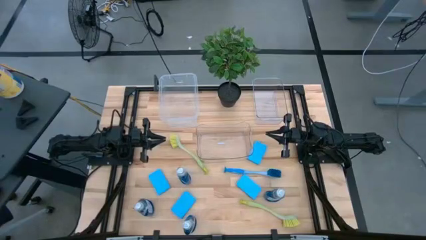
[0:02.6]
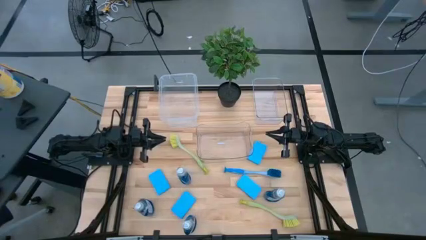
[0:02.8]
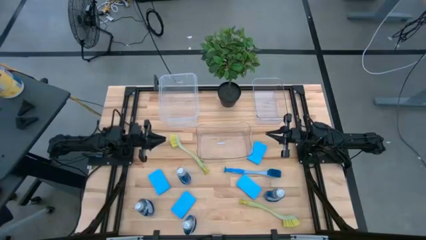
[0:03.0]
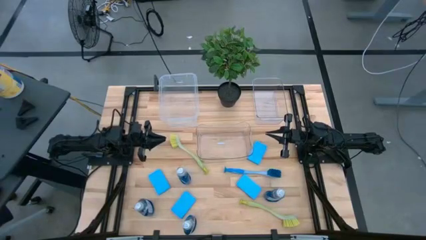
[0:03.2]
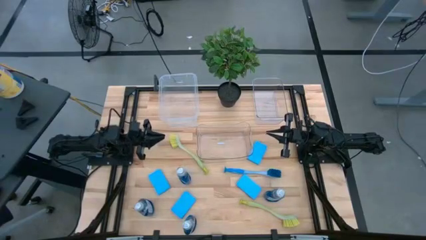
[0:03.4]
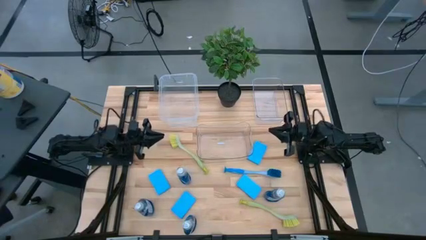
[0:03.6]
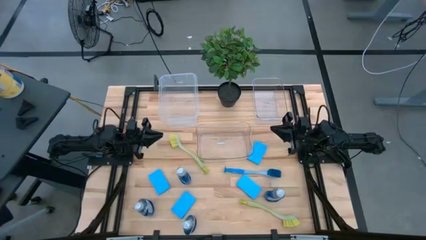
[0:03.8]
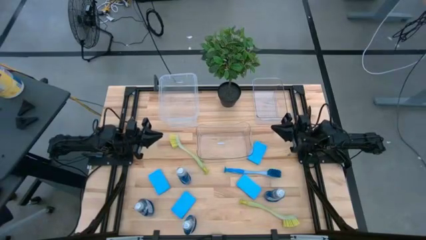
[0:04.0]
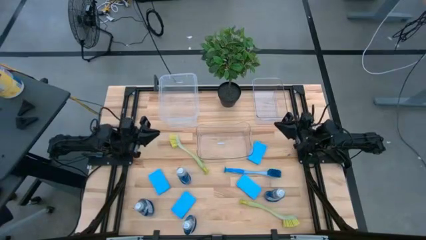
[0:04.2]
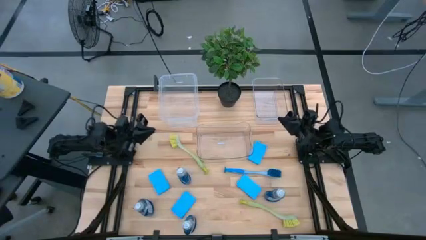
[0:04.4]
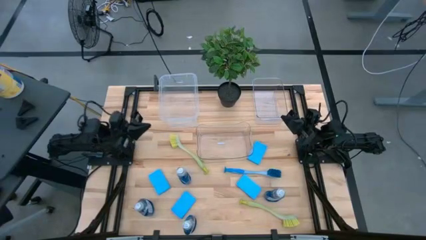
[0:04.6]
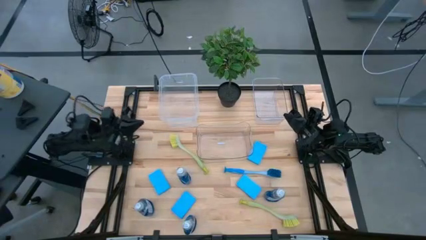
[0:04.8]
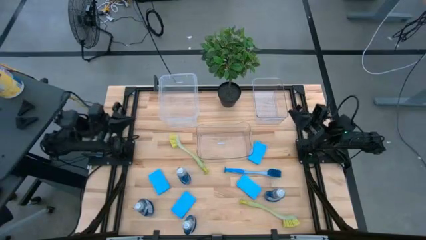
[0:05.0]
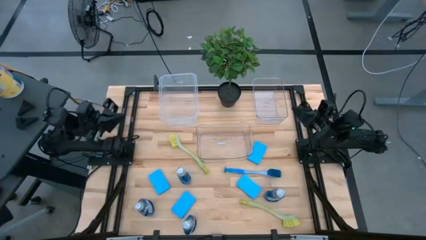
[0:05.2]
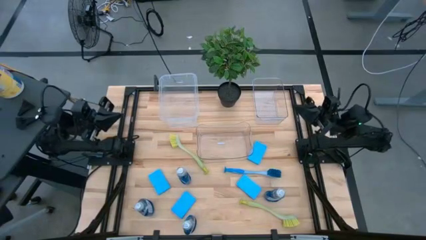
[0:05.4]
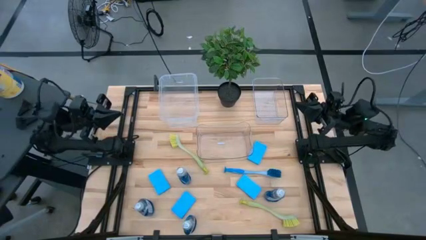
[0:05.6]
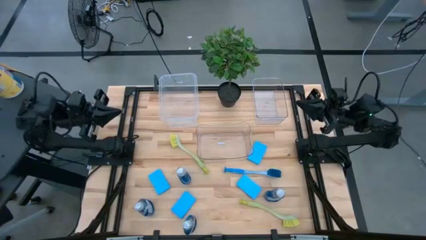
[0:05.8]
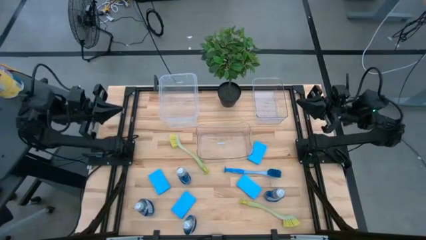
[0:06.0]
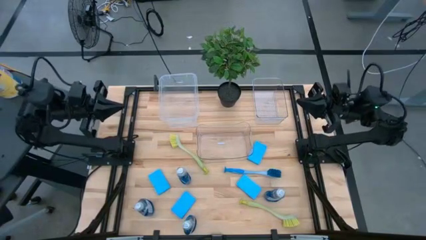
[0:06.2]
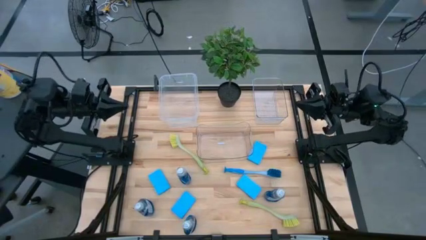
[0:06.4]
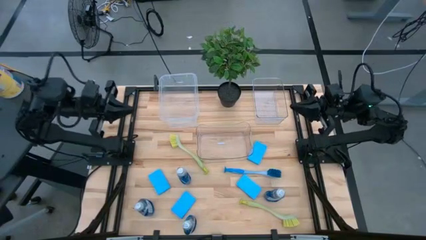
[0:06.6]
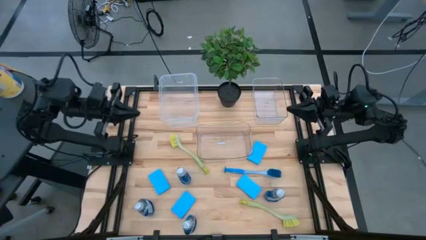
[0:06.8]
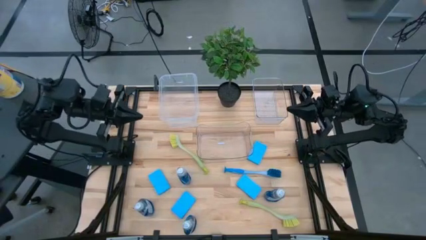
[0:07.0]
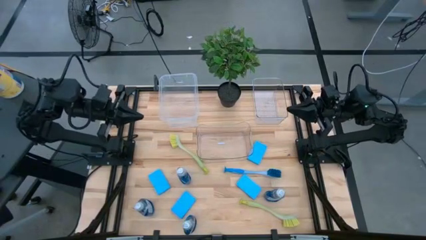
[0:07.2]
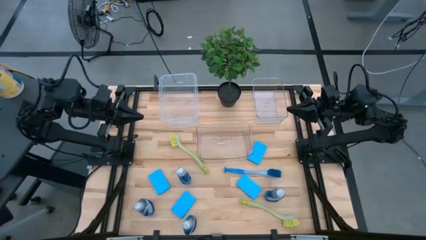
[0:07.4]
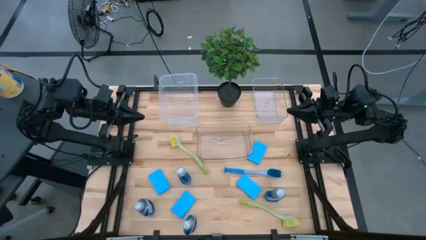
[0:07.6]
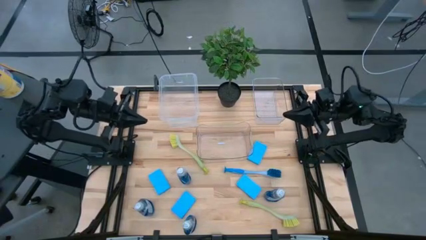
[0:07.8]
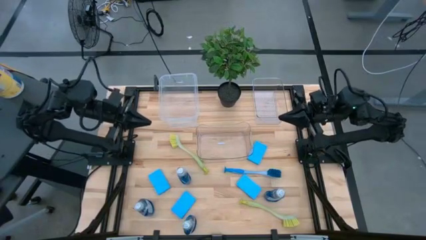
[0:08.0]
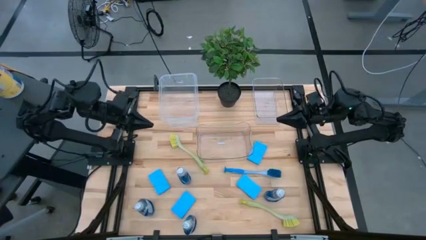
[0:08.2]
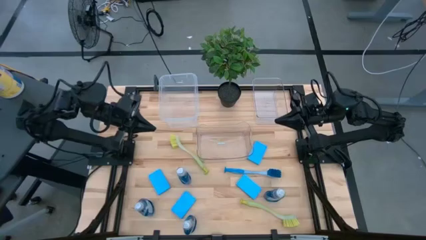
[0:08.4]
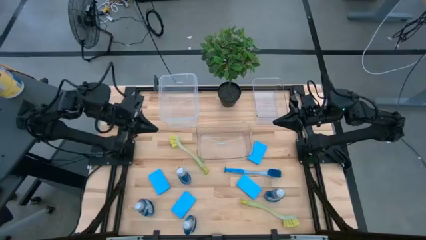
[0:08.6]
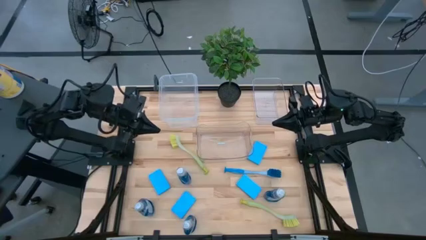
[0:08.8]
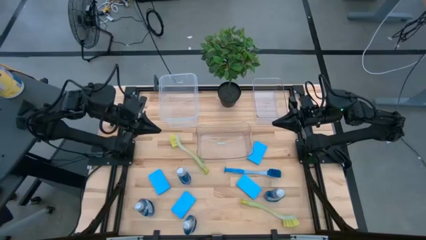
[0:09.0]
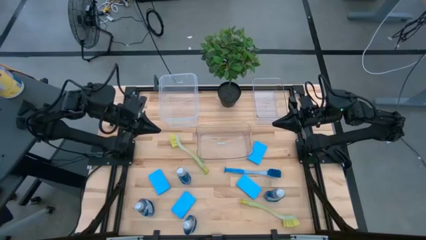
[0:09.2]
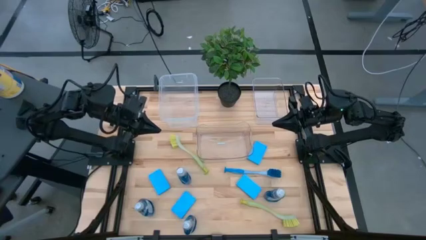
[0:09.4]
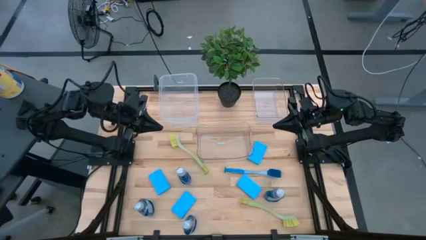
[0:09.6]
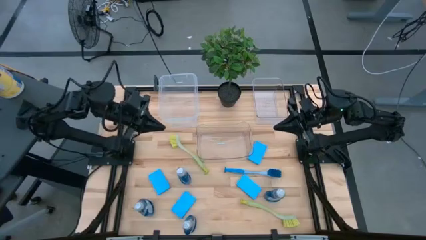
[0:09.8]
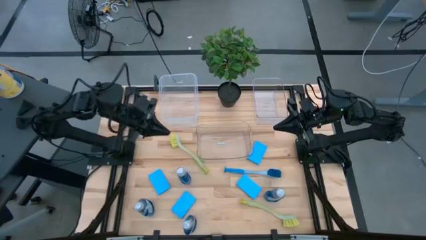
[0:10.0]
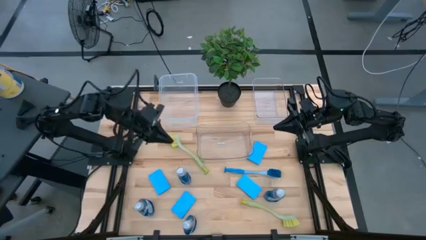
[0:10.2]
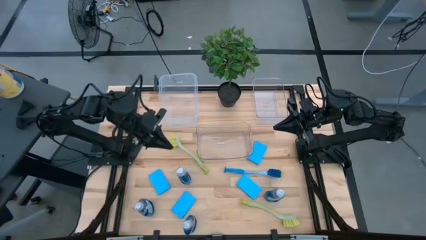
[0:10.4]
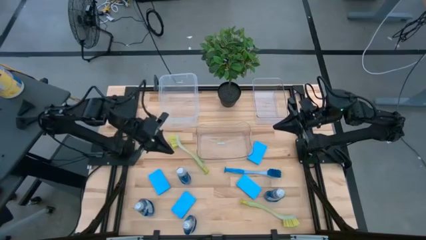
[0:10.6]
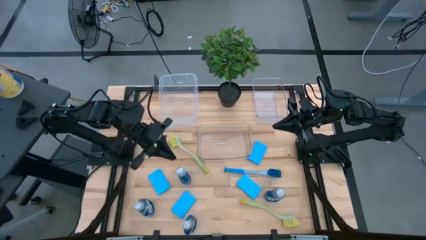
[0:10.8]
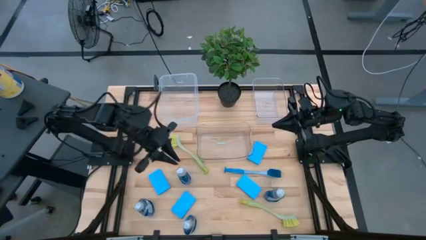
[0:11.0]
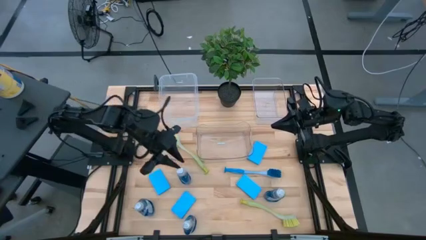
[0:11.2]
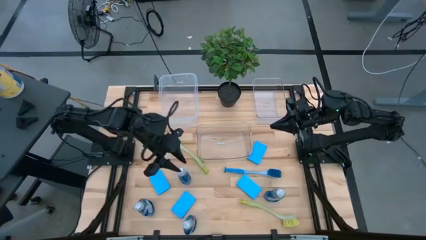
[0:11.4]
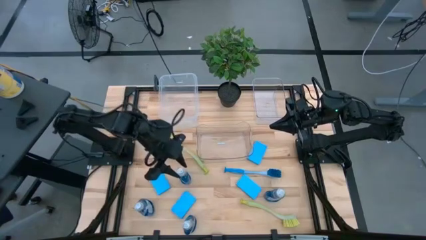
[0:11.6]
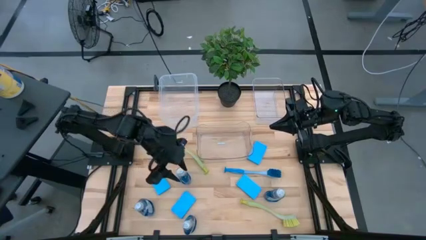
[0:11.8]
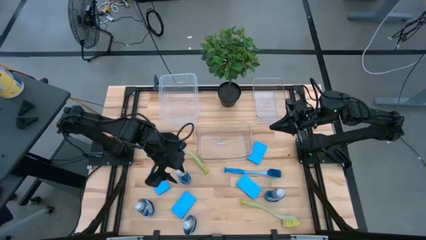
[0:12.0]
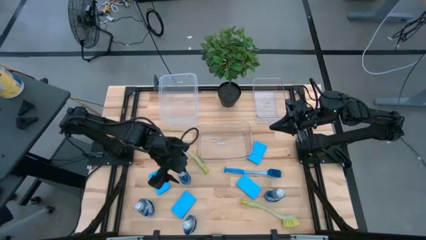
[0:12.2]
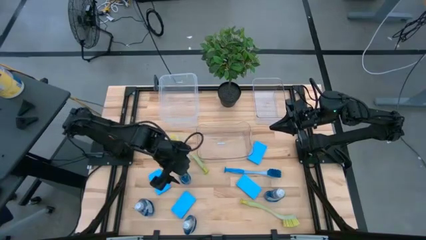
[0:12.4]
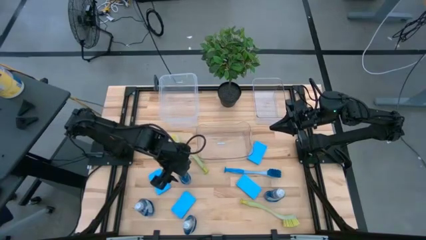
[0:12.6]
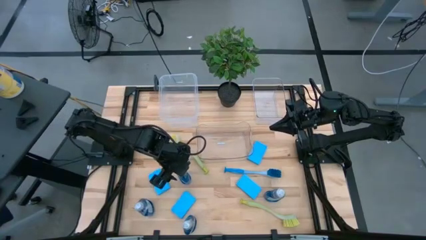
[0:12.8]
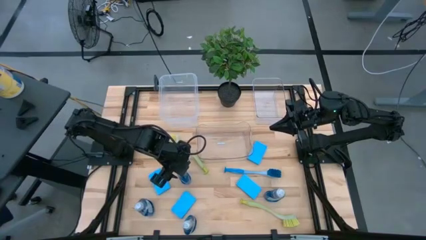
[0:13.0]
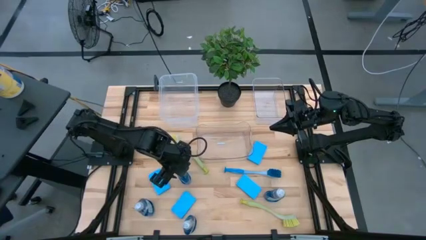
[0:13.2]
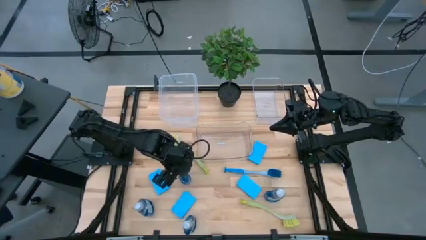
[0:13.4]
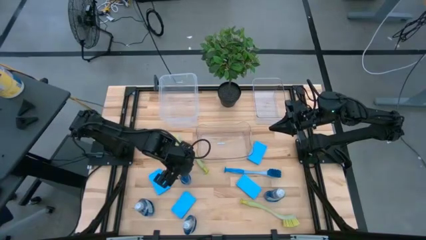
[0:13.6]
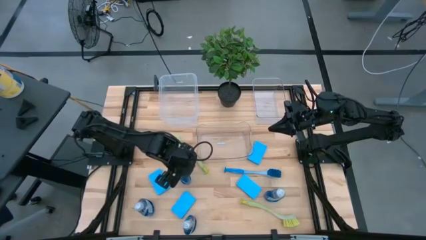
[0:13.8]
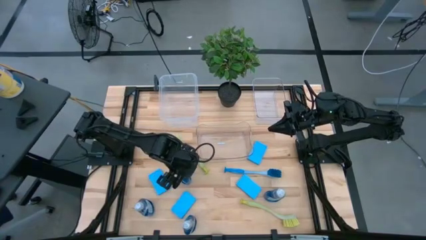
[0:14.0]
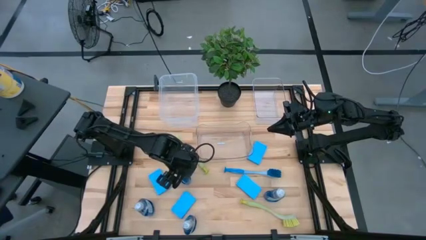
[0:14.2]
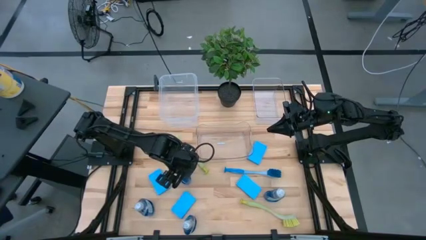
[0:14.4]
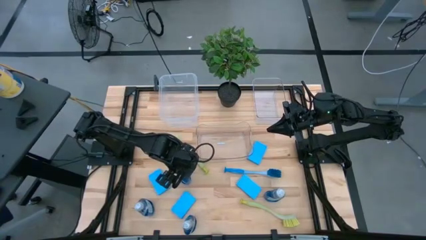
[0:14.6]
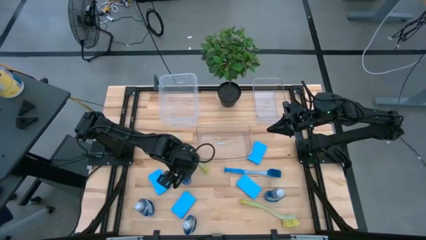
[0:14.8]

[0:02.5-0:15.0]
Task: Pick & Place Kitchen Sink Supplies
Put the dish soap into the top transparent bin

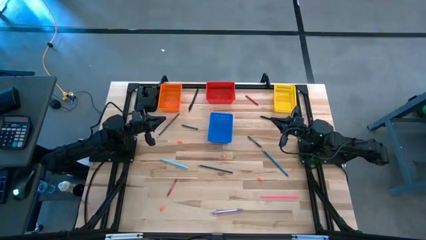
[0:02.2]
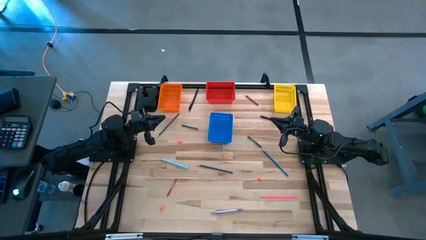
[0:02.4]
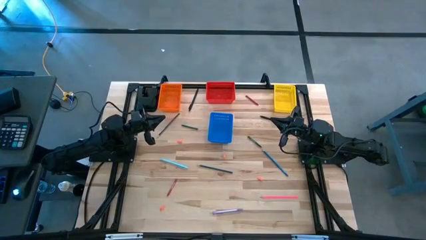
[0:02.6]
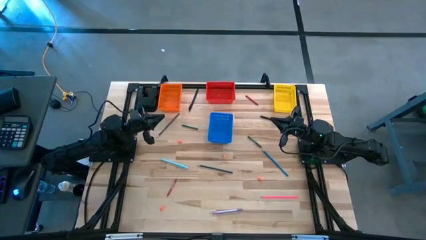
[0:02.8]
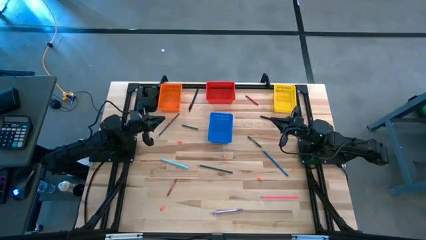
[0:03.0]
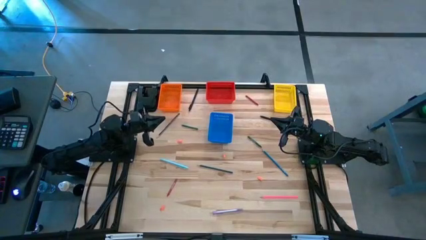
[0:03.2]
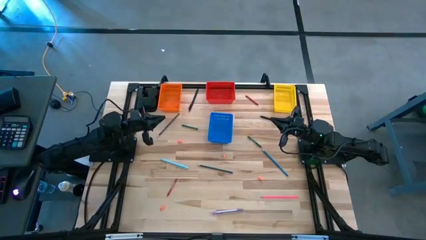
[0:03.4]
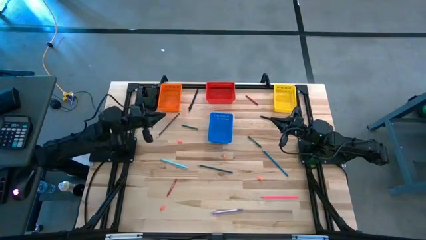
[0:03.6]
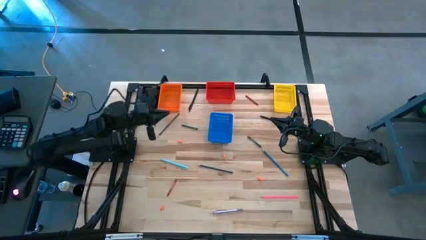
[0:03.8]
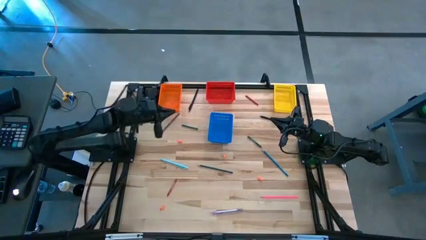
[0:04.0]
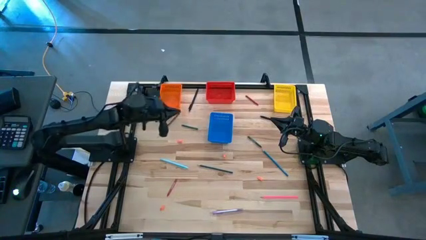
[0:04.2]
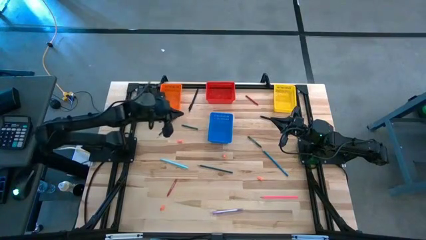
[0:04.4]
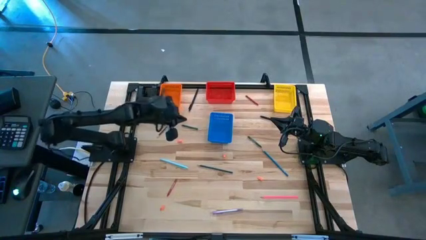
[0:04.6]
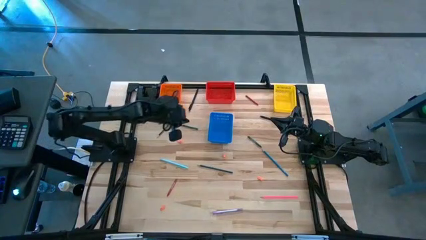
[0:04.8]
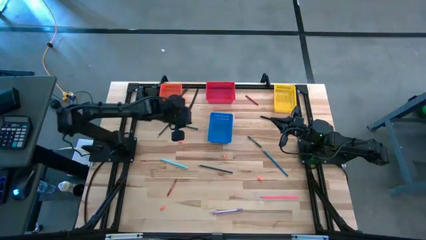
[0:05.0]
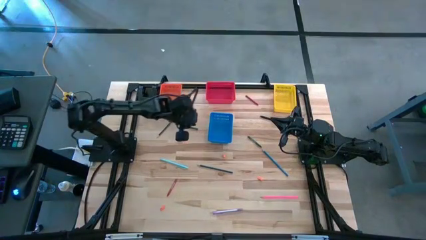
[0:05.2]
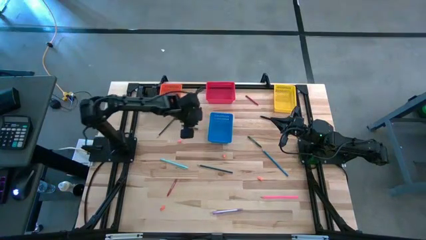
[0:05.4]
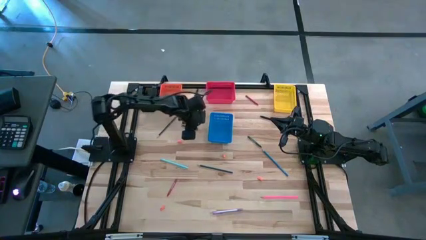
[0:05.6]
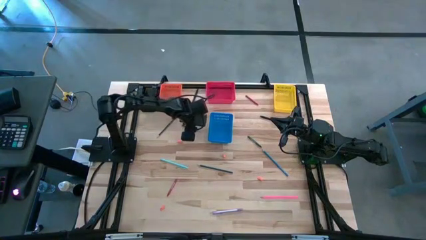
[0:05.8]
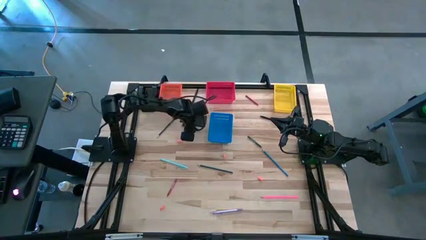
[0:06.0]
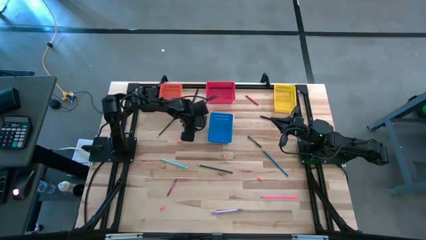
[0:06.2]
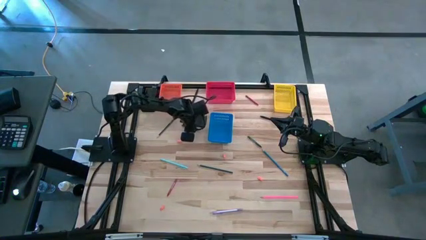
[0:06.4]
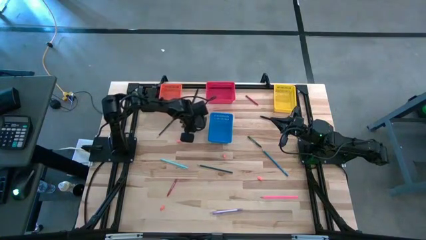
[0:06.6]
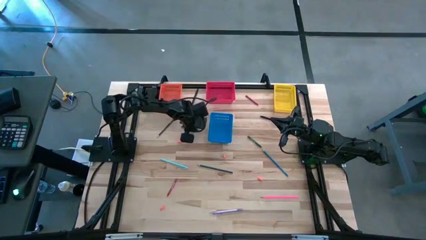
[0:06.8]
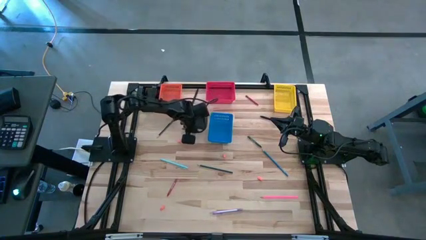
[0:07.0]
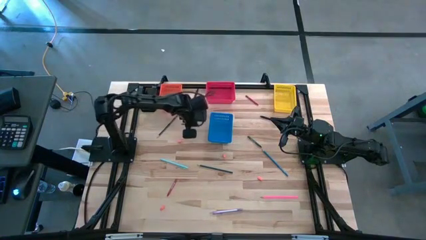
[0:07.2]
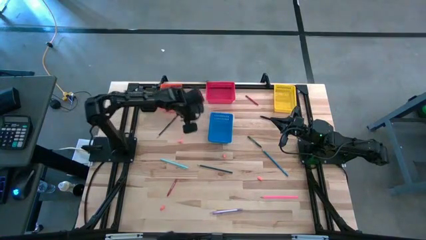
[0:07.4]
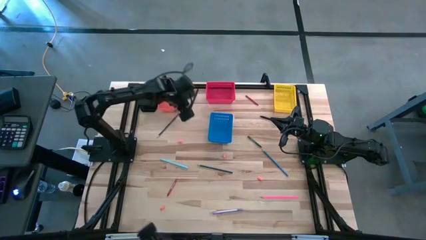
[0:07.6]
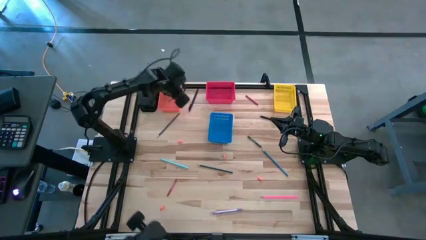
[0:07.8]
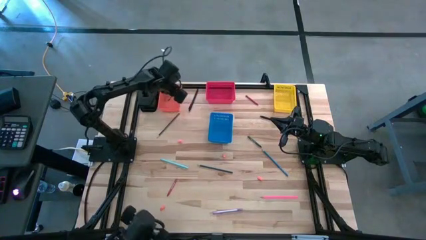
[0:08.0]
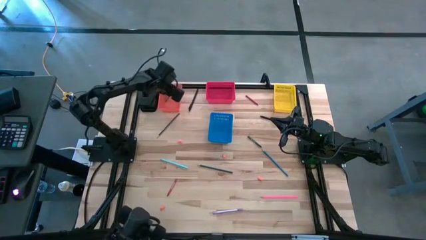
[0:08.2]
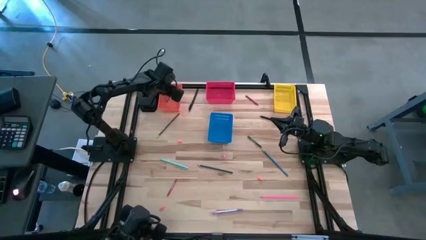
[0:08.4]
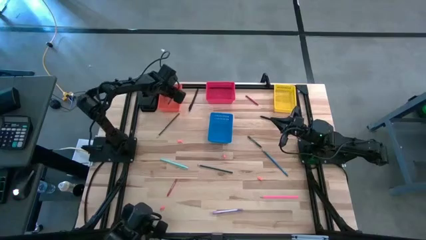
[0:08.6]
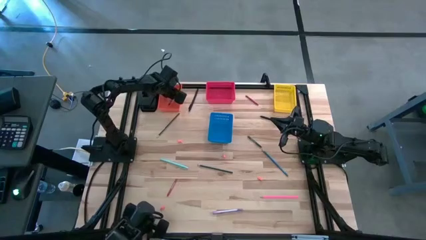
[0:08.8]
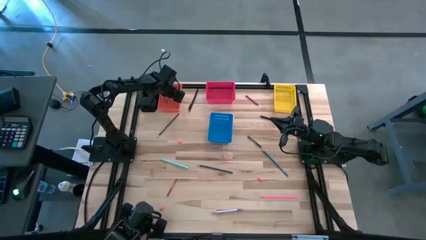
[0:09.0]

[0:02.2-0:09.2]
Task: Sort crayons/erasers/pens/pencils in bins
Put the dark green crayon into the orange bin
